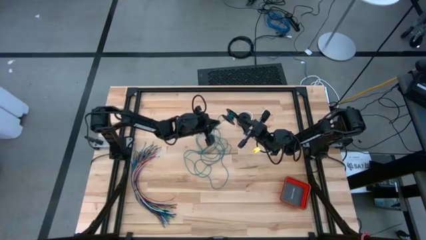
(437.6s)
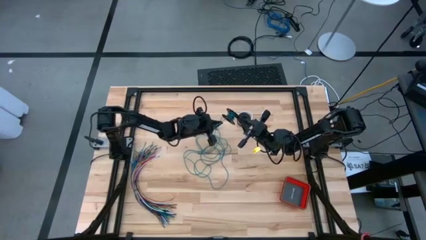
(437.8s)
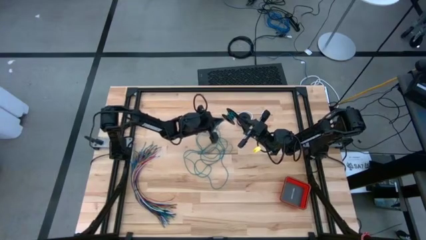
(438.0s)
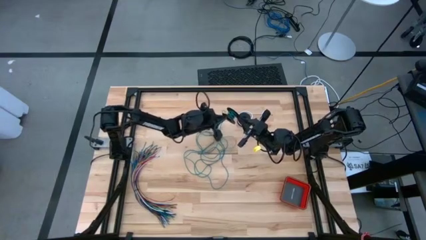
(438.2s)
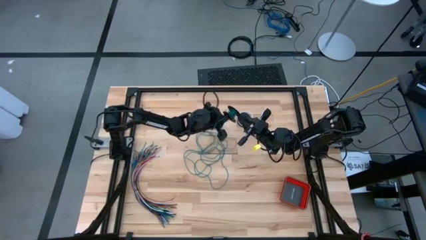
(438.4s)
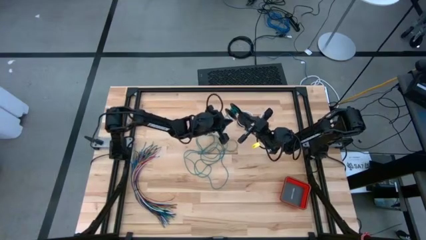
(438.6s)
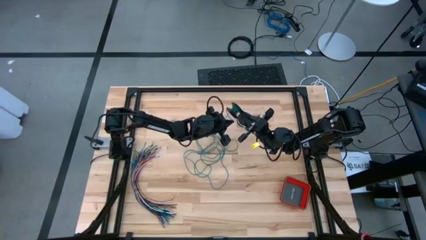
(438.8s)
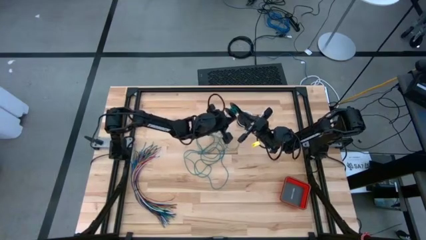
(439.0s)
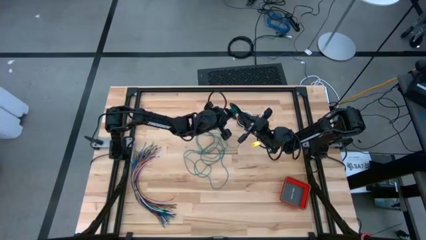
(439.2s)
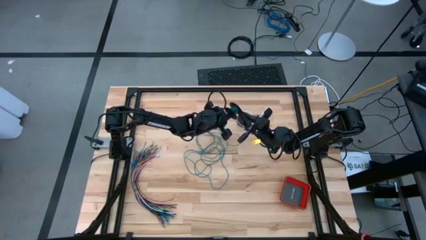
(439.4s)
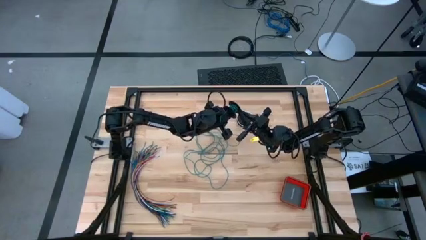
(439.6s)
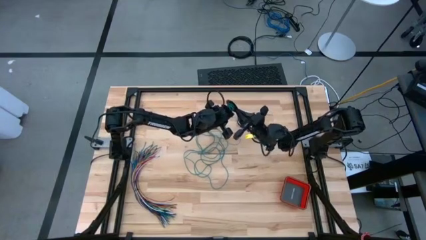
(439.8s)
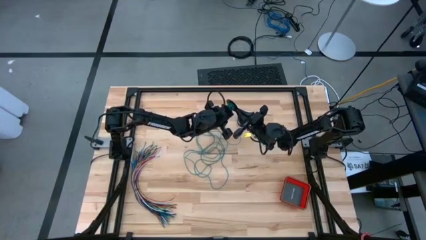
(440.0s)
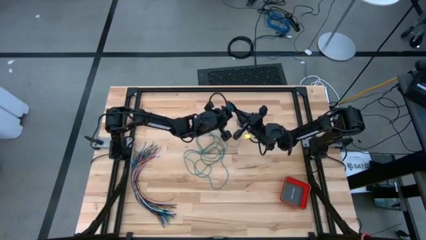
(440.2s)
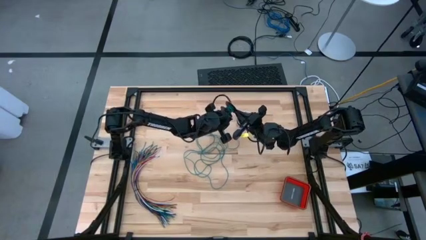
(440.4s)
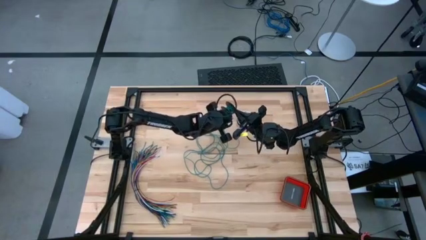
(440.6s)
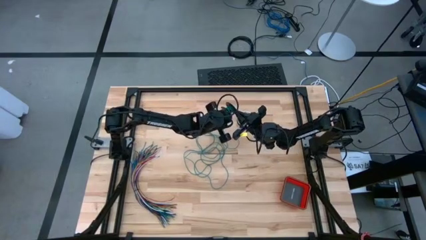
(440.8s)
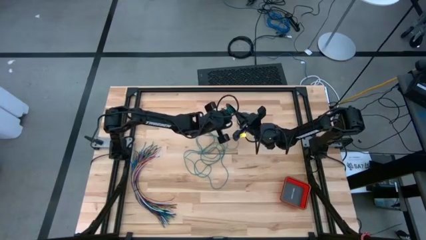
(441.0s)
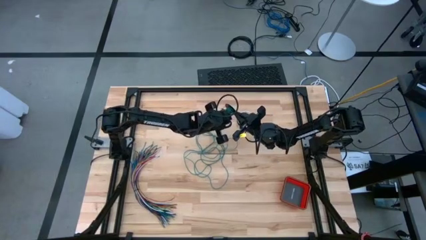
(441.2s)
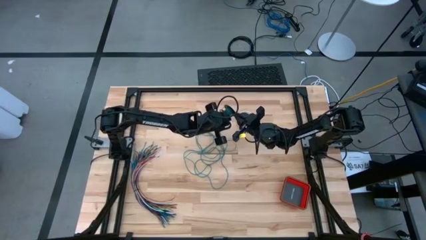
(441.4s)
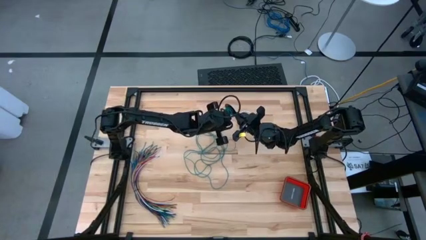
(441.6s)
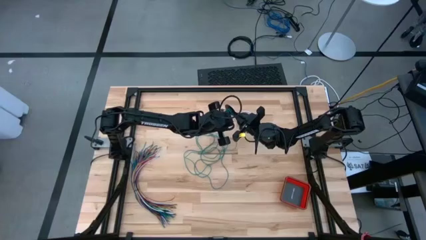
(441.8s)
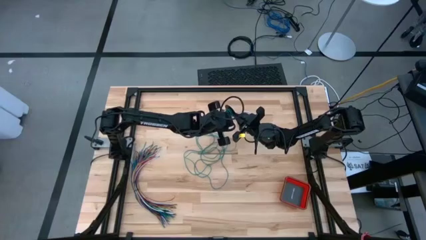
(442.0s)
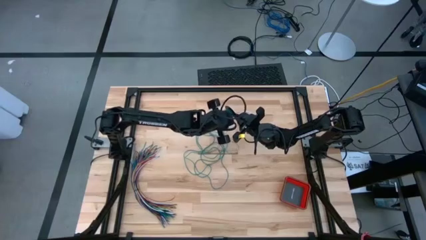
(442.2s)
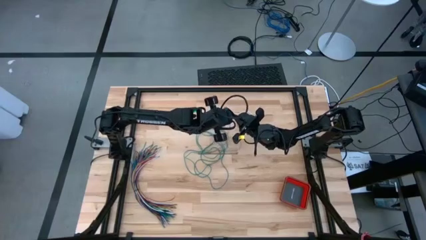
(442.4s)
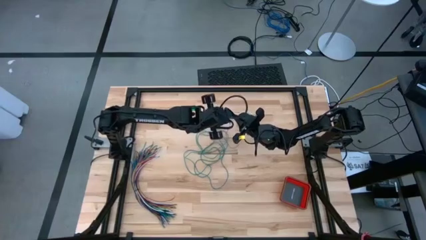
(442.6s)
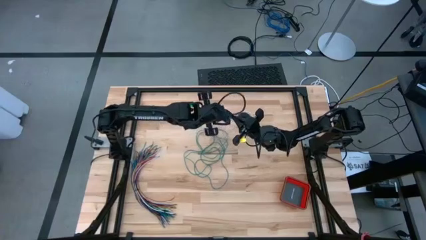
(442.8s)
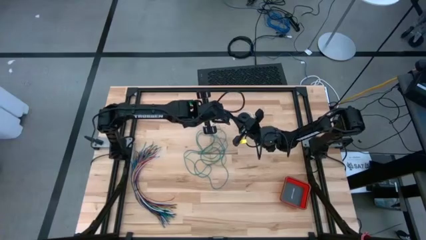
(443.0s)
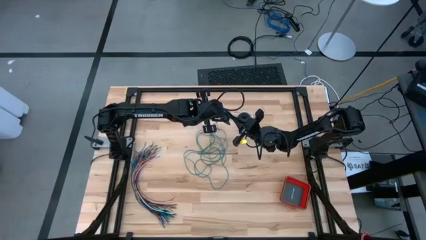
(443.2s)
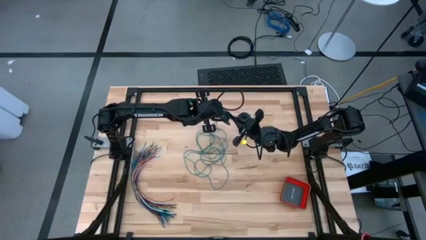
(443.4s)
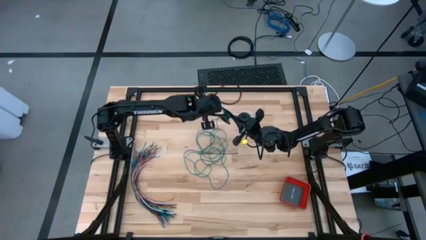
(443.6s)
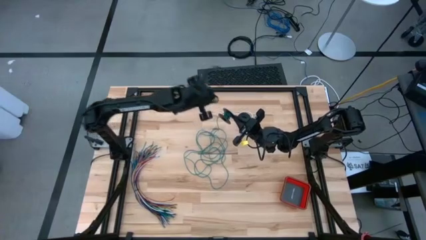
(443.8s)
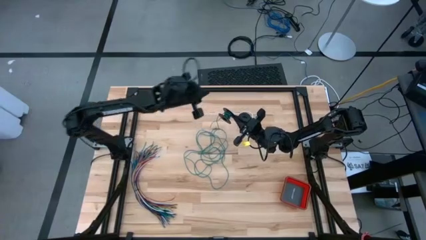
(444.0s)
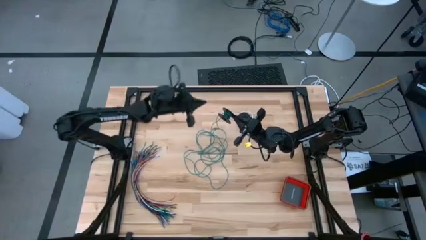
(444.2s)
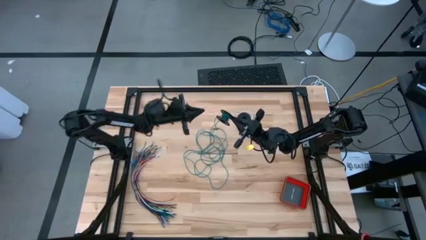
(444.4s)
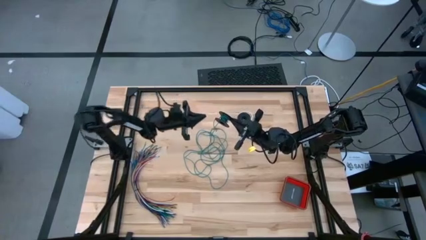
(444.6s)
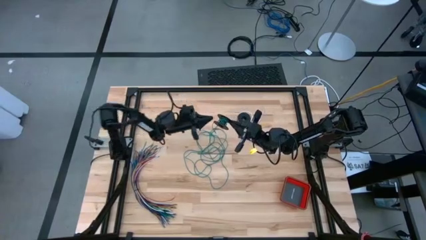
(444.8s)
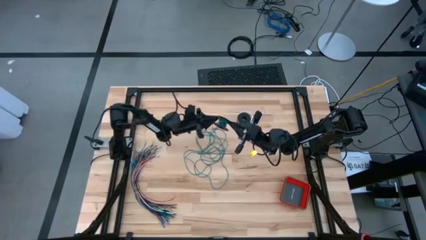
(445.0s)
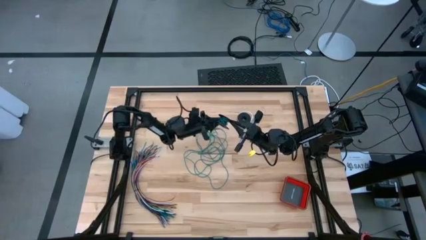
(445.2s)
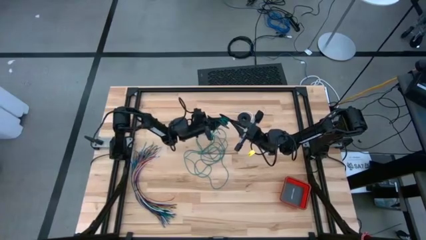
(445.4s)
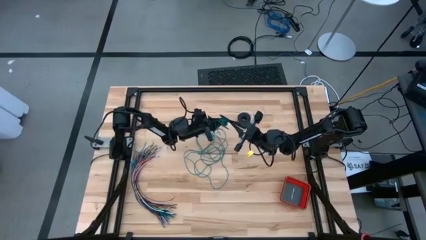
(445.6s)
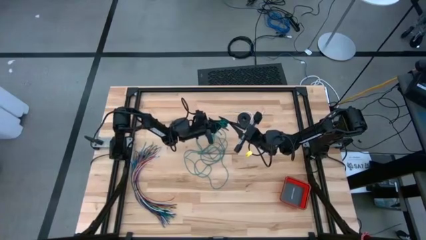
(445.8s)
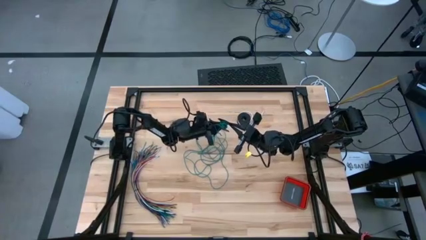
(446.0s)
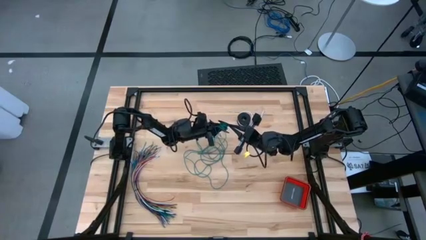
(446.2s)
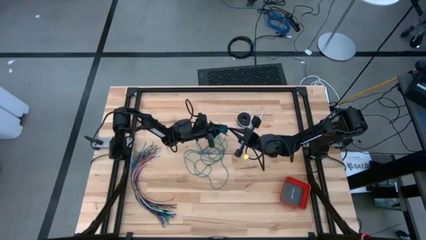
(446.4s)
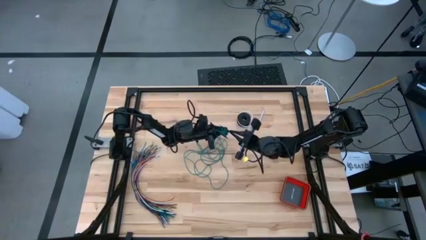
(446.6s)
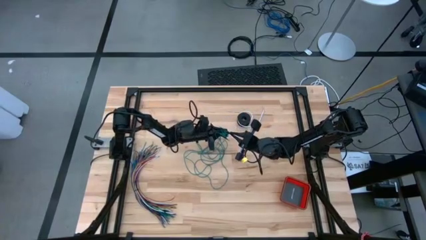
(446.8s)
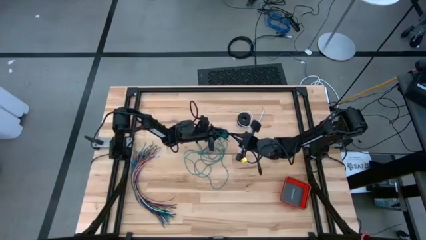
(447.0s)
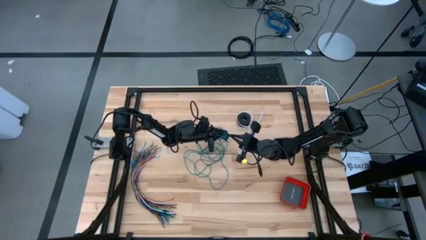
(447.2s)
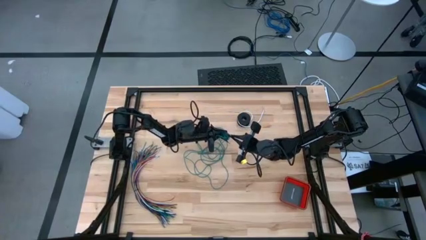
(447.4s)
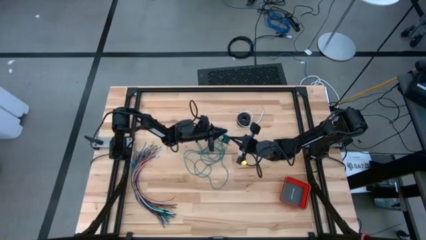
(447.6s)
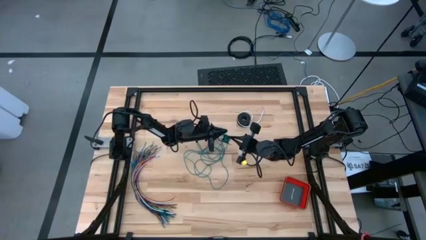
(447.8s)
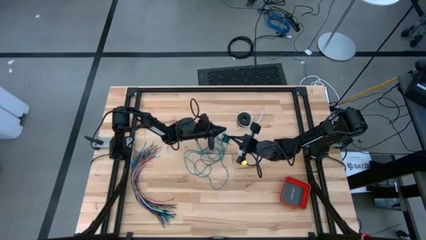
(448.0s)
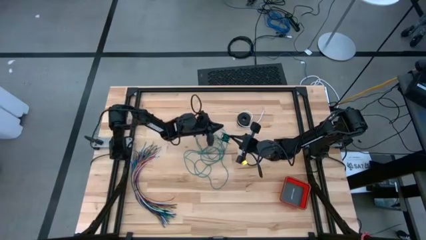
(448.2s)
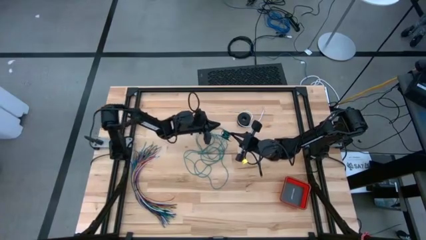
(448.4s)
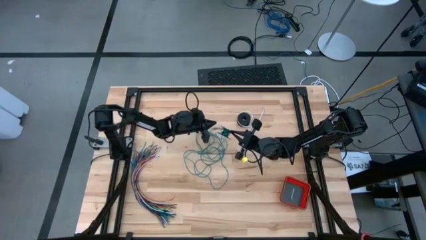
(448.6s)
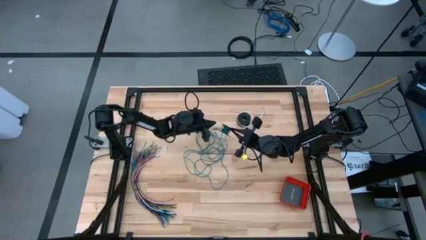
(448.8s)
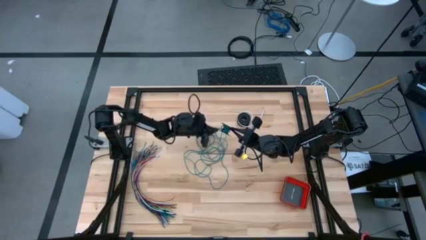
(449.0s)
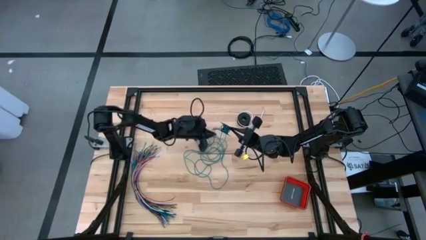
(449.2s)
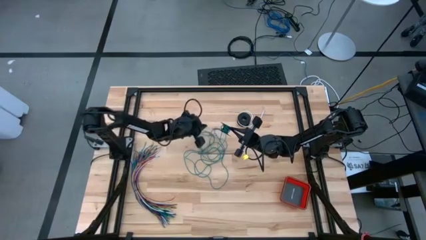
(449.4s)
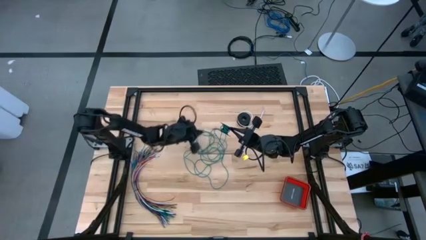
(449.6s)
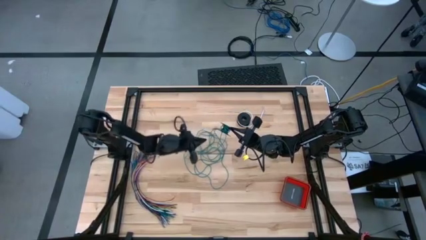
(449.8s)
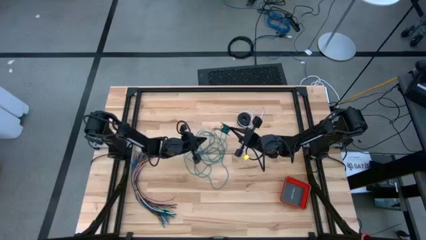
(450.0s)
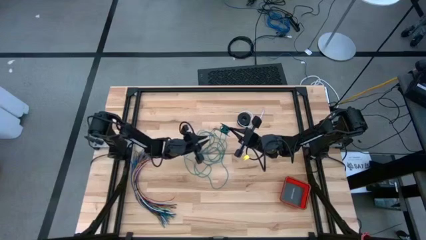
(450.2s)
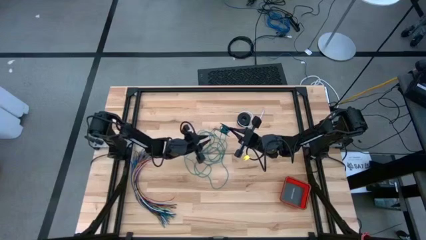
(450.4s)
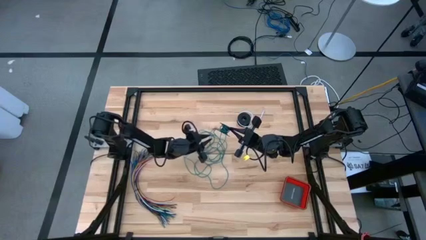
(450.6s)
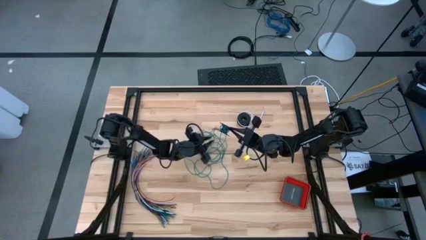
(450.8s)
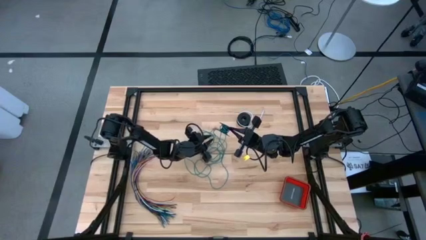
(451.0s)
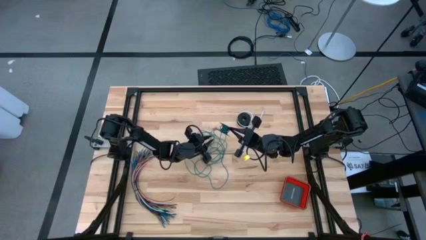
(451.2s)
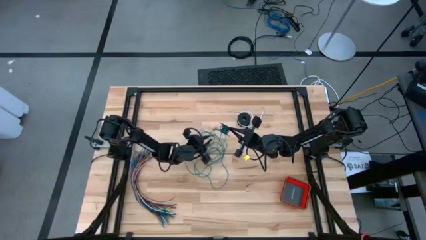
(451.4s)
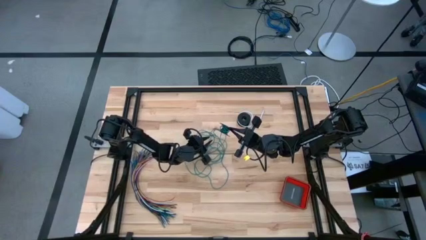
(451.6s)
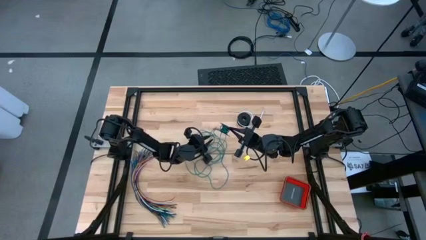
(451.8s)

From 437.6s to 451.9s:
Task: Coil cords
Coil the green wire onto the spool

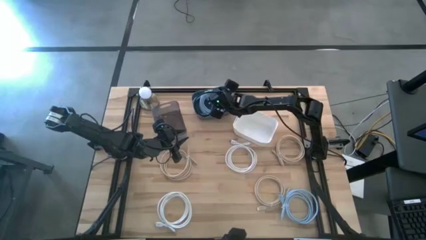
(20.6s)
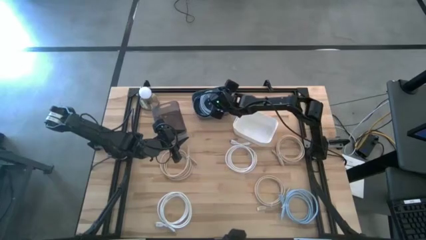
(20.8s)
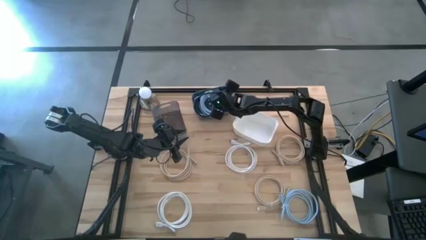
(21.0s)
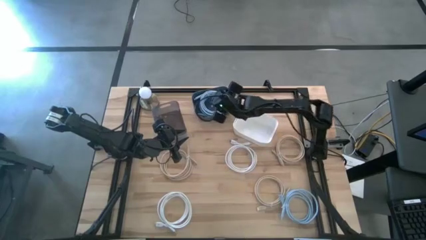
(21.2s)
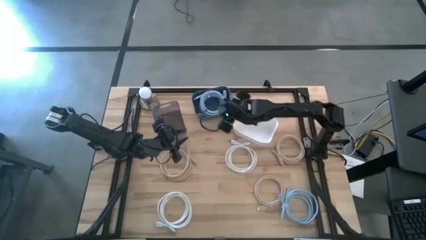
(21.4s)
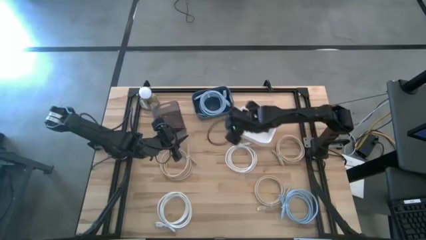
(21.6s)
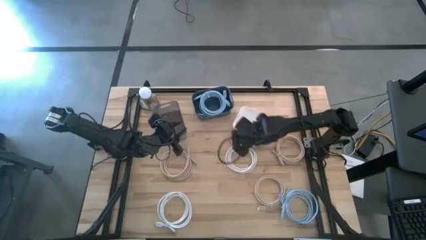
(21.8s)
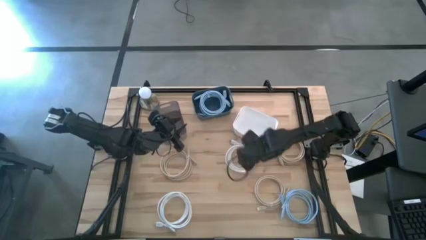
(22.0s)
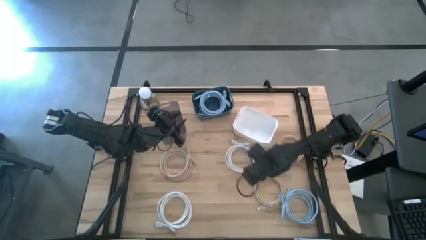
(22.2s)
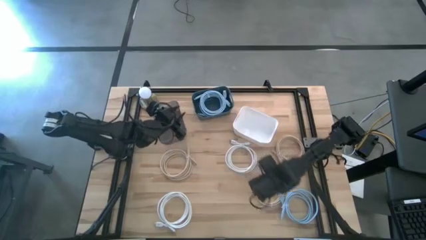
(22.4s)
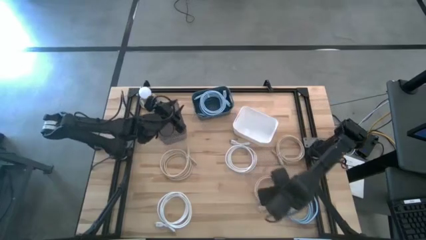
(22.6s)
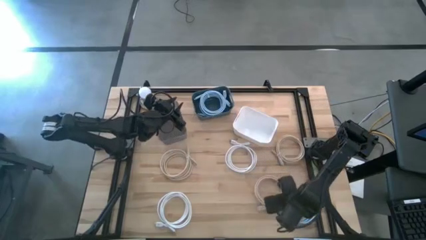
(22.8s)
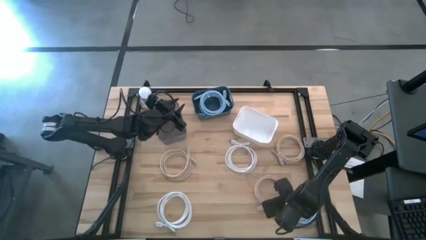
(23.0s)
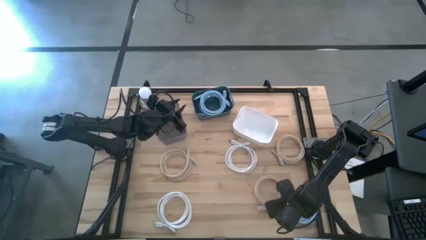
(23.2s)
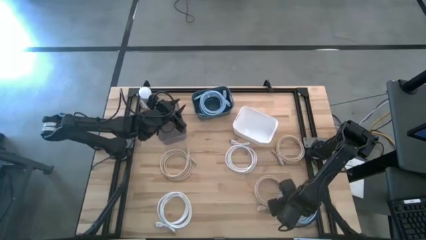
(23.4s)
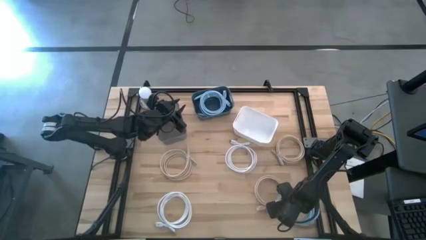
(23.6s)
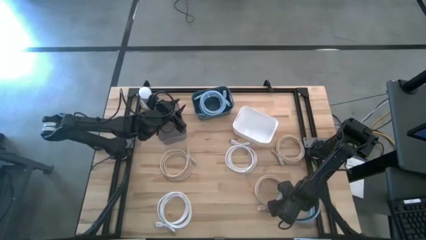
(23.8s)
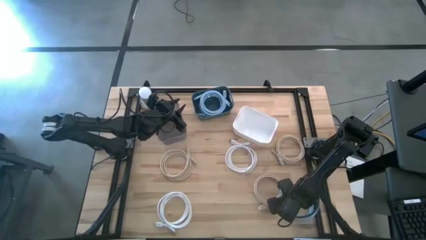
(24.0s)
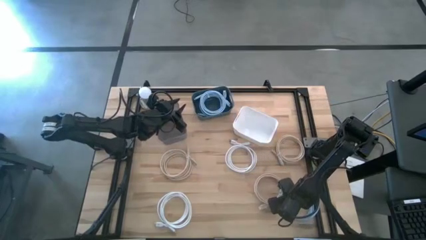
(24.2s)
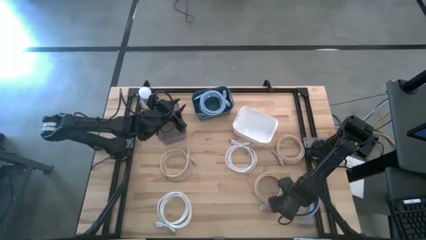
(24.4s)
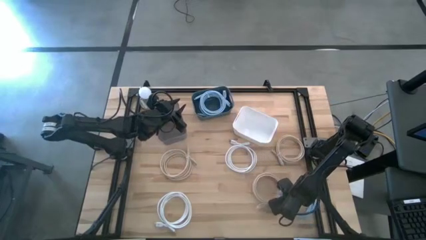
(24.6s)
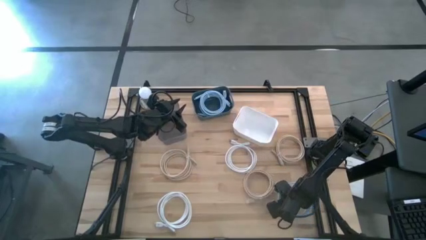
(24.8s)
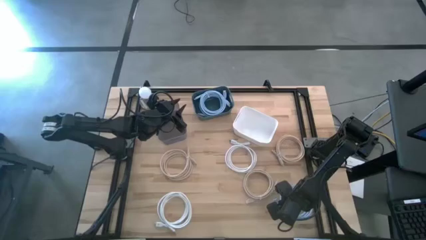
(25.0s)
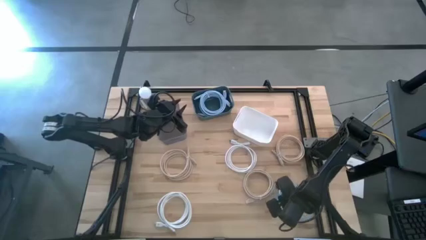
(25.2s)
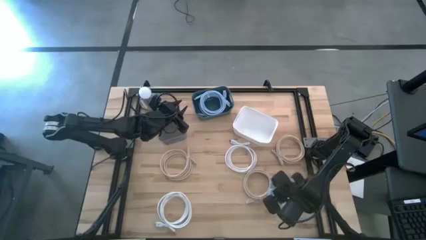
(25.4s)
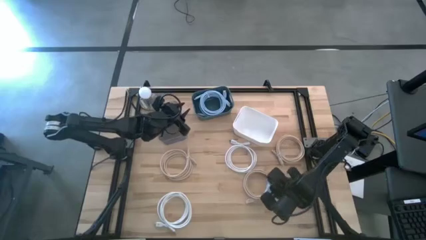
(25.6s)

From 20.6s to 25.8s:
Task: Sort HDMI cables
Put the blue HDMI cable into the blue bin
